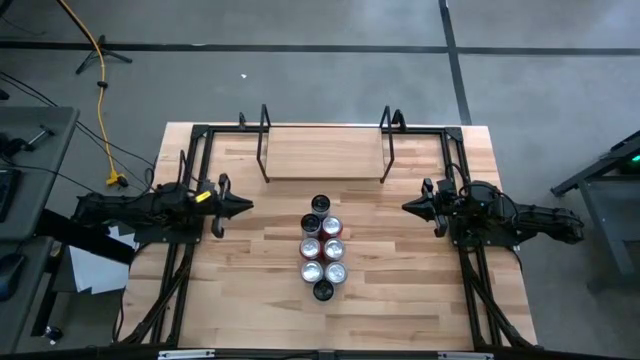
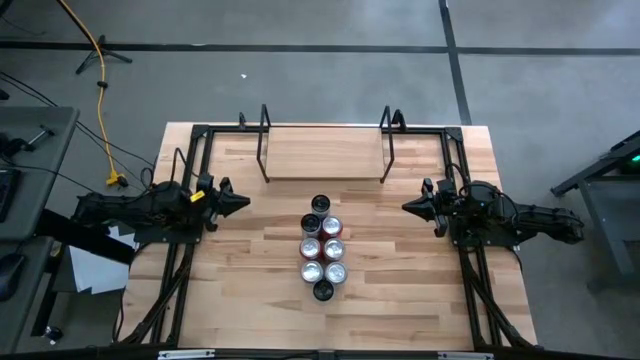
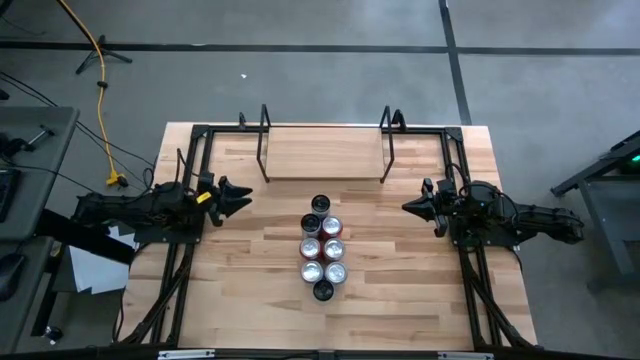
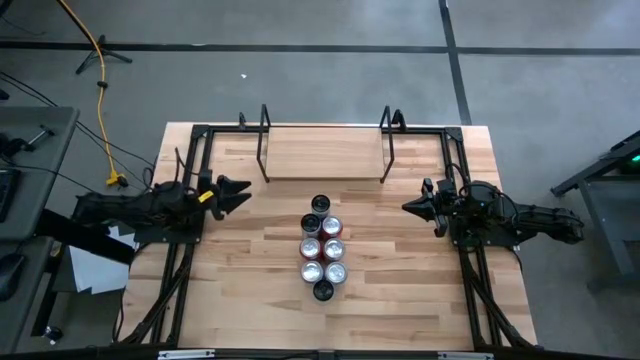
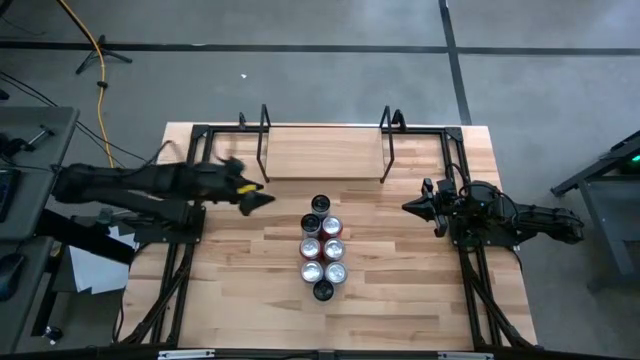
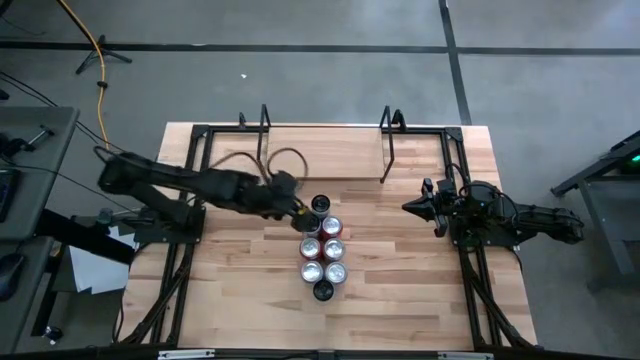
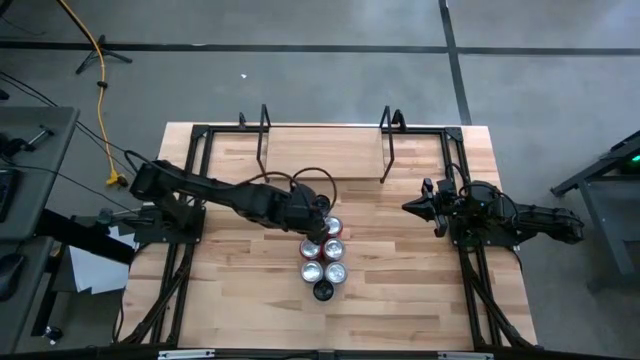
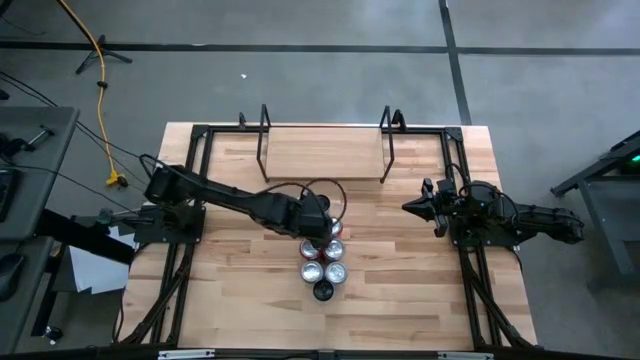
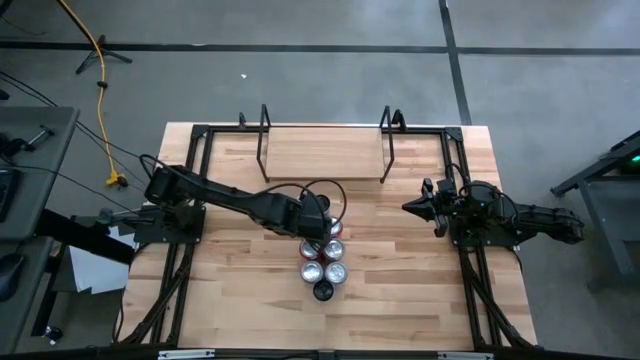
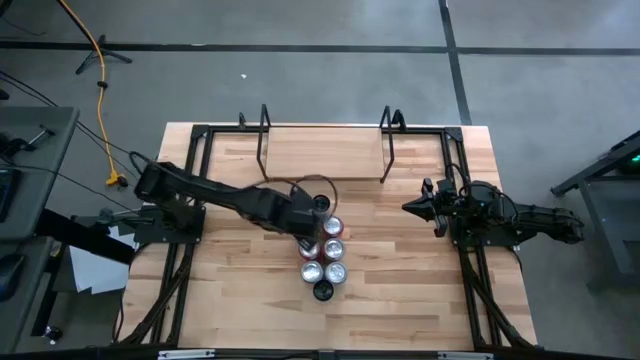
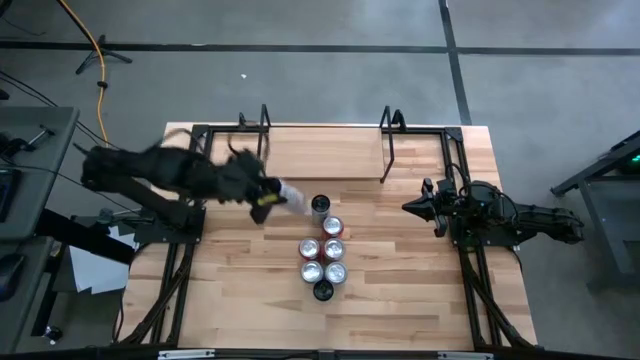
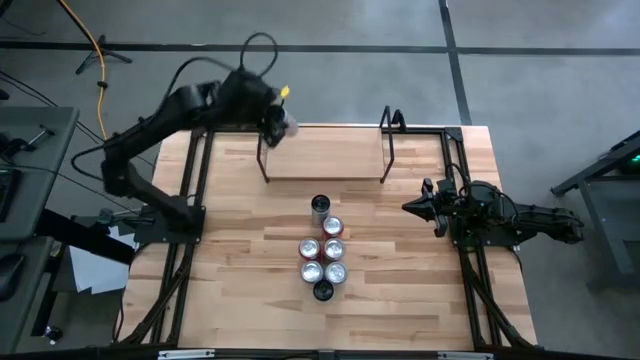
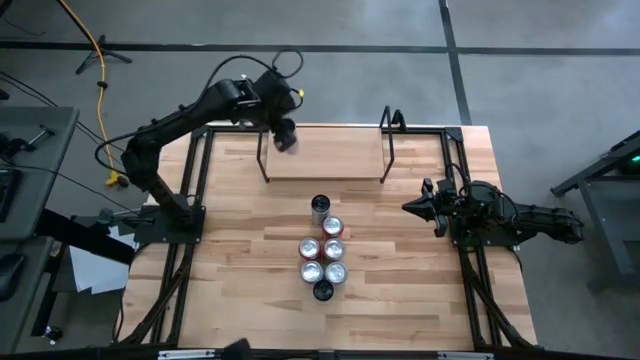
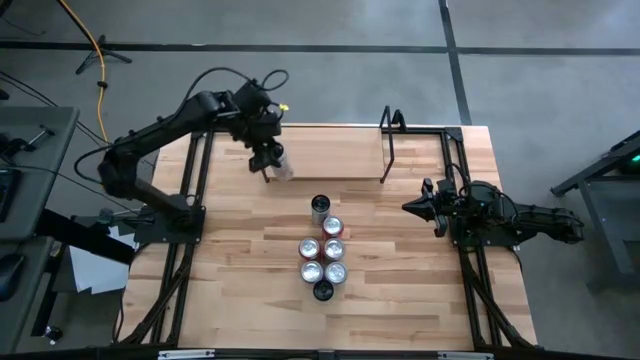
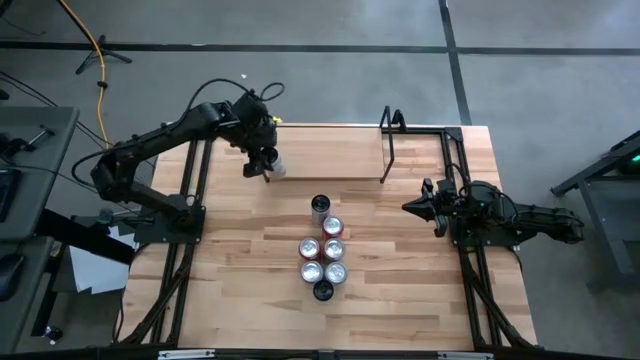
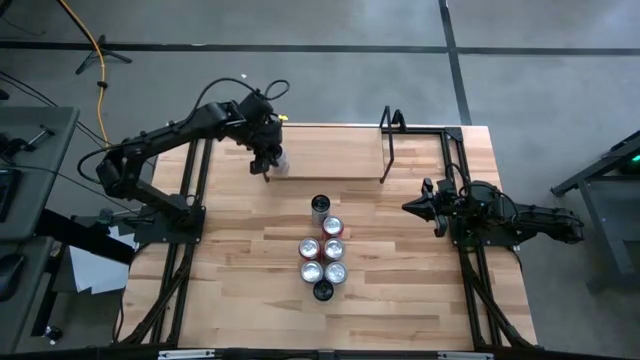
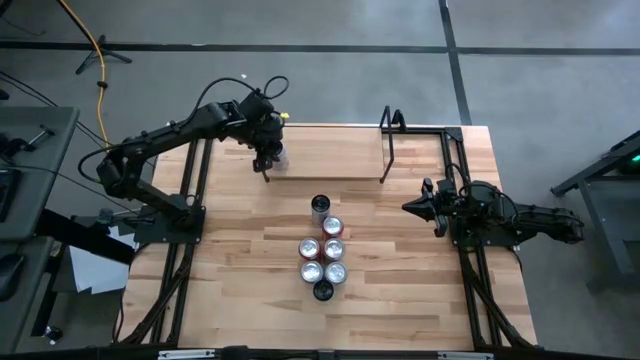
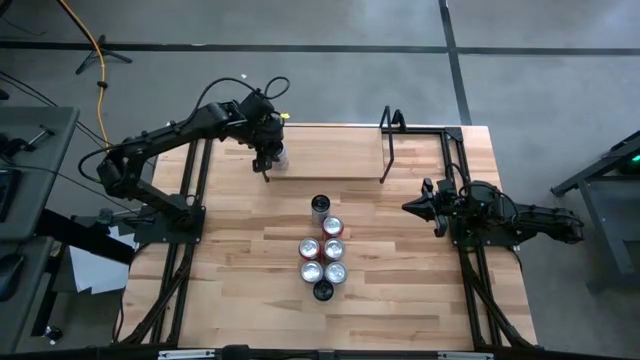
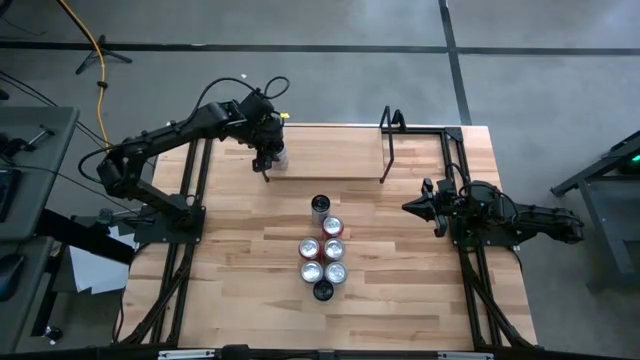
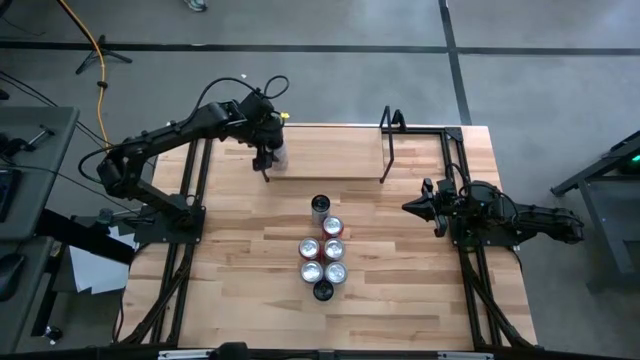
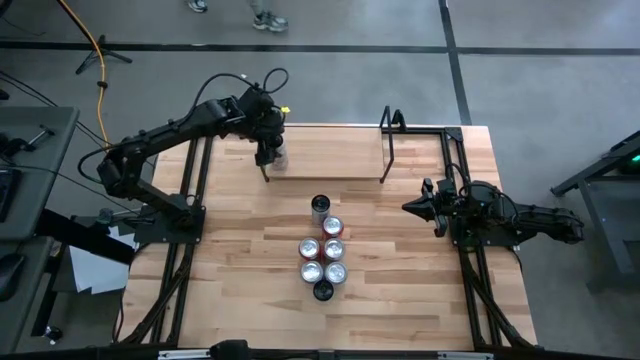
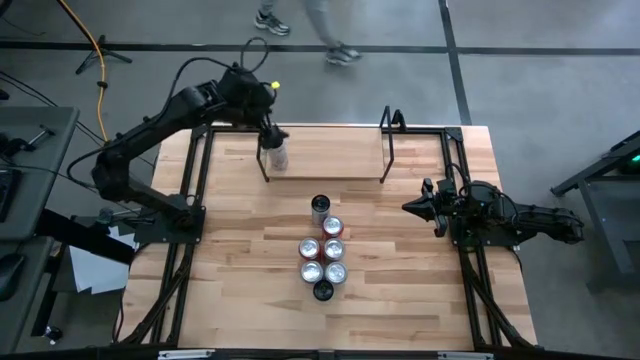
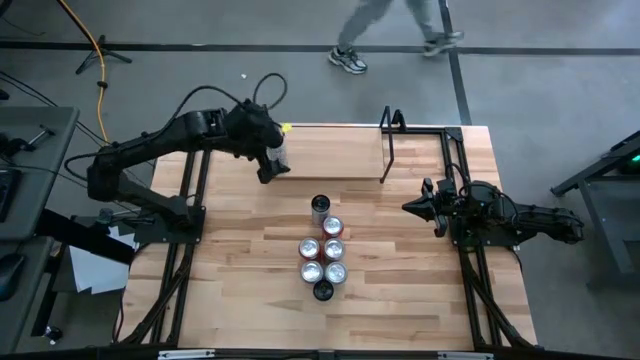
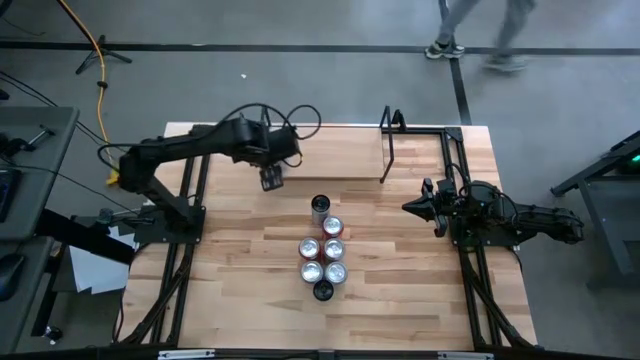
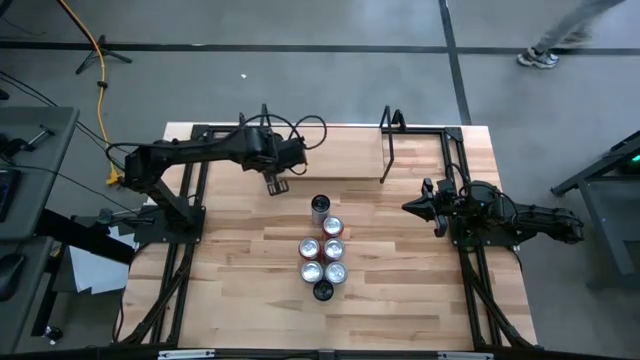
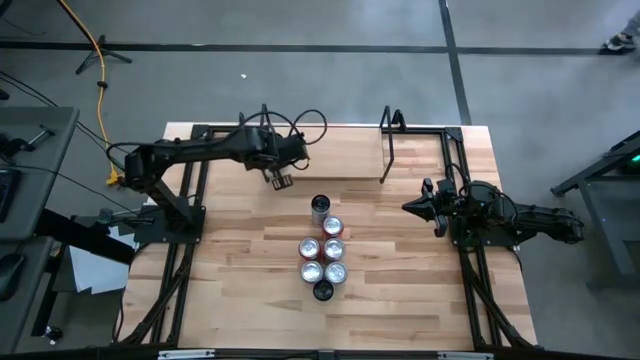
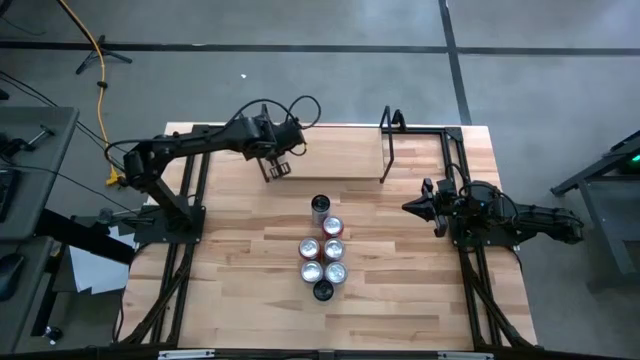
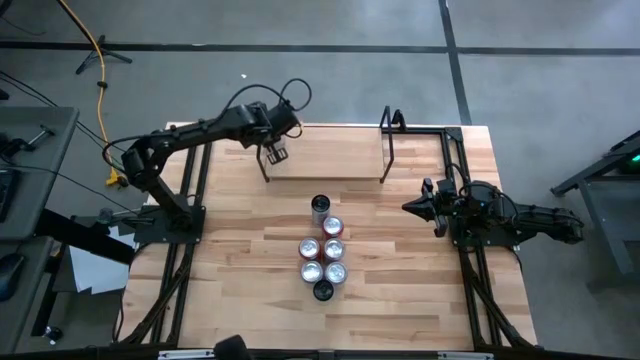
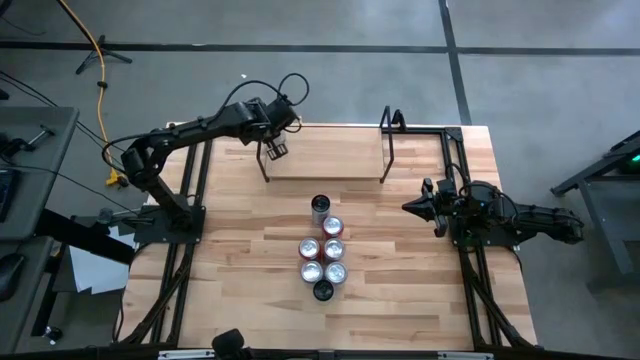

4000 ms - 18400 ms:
Task: Place canned beverage on shelf
Put the middle white soda can on the shelf

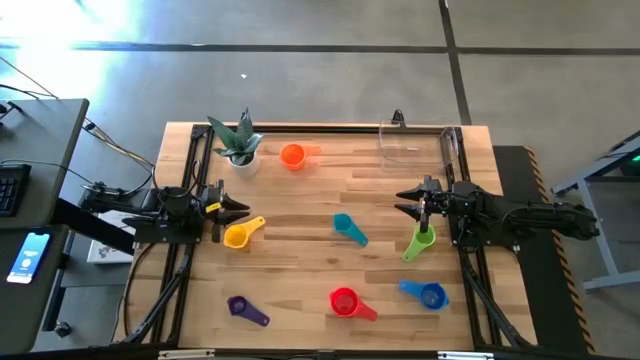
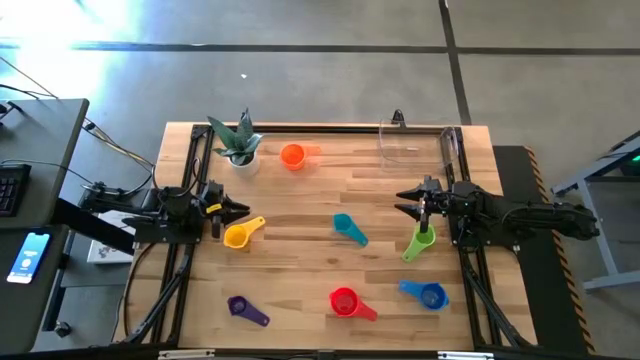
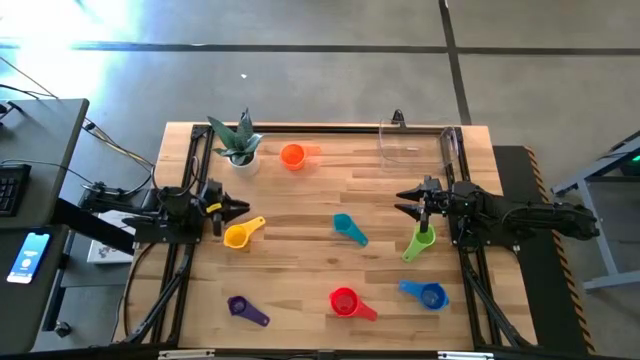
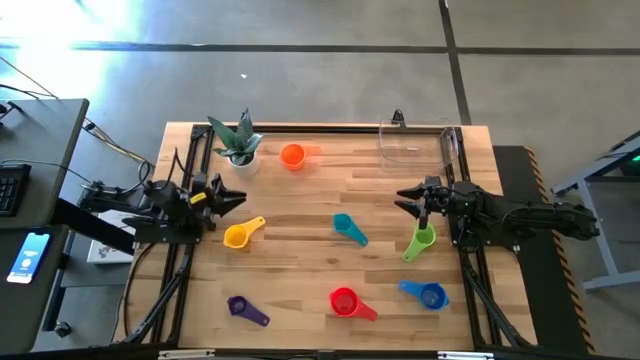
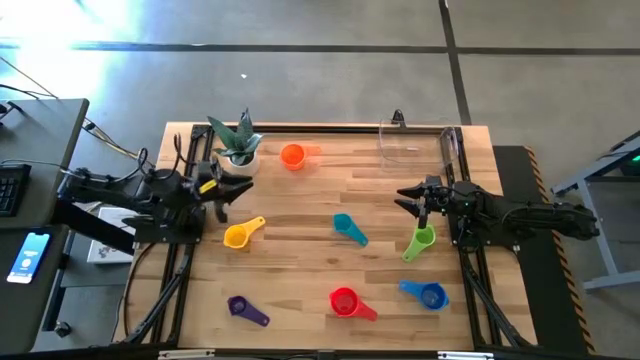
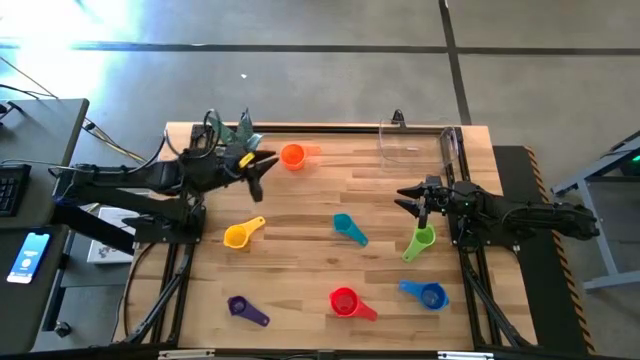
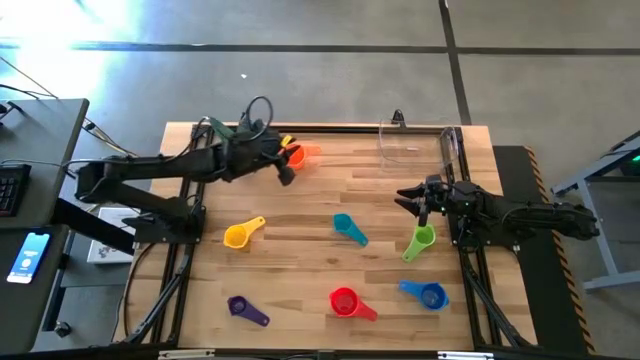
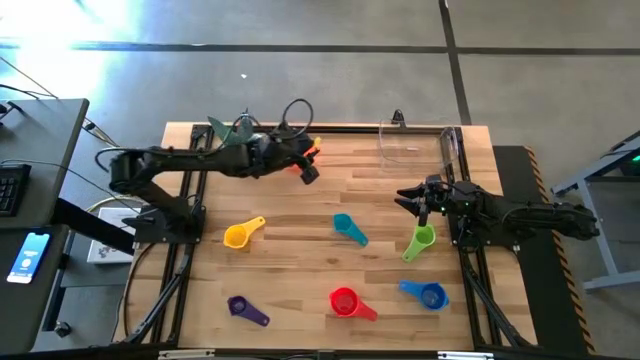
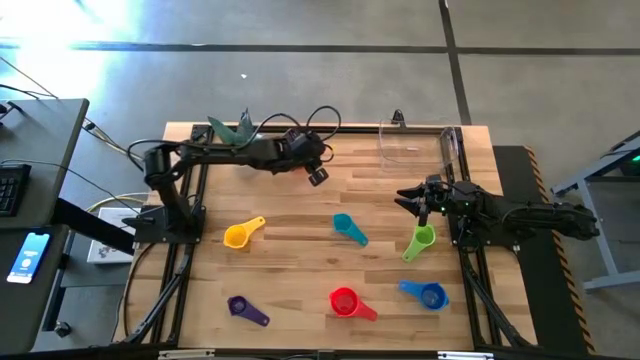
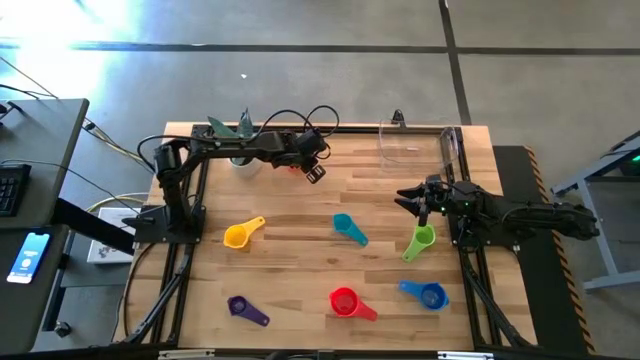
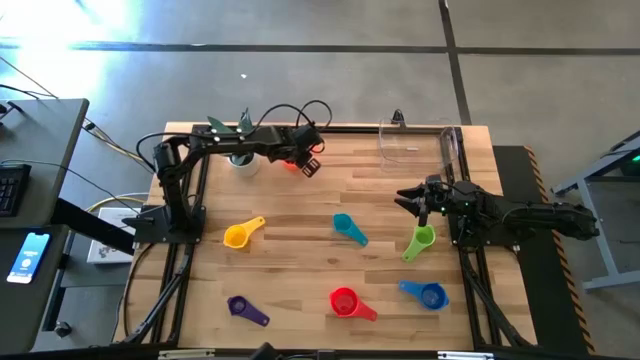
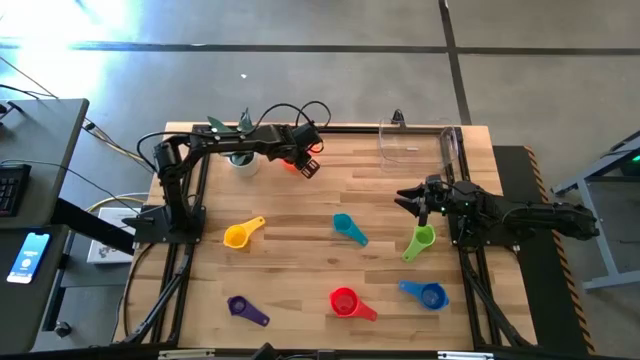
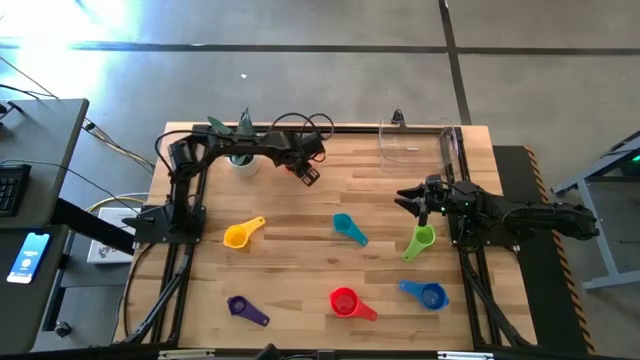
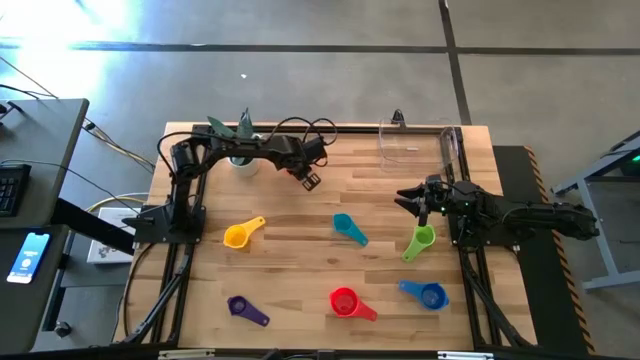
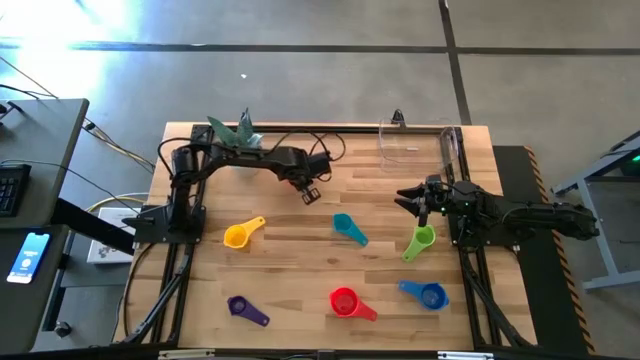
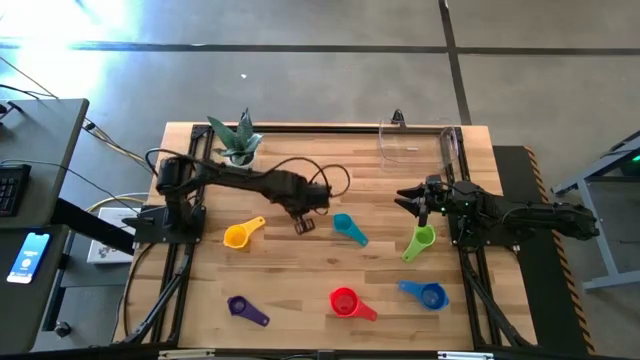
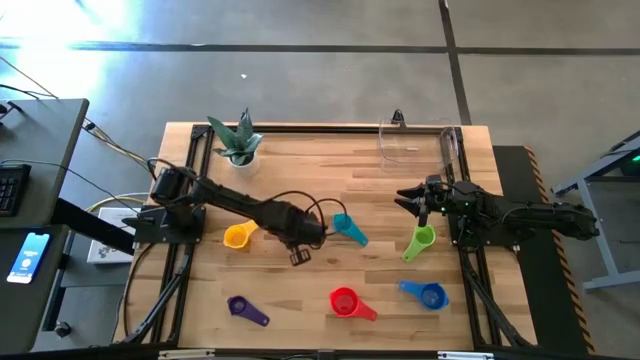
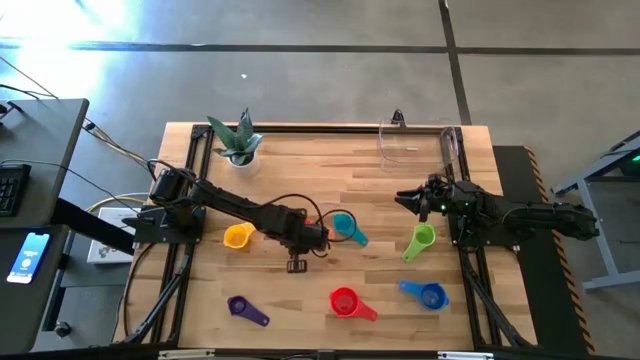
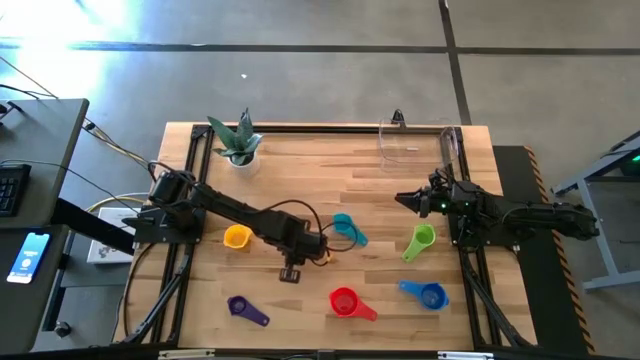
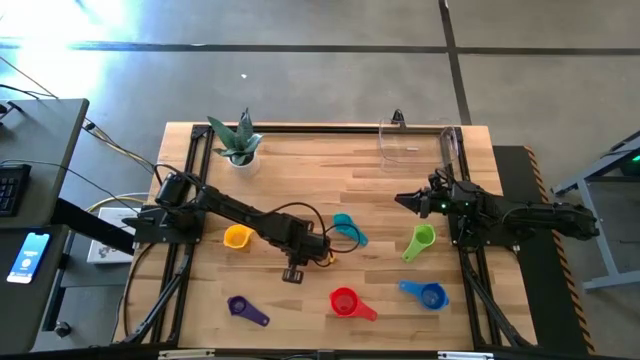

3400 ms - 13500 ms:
Task: Nest measuring cups in basket
Move the orange measuring cup to the center
